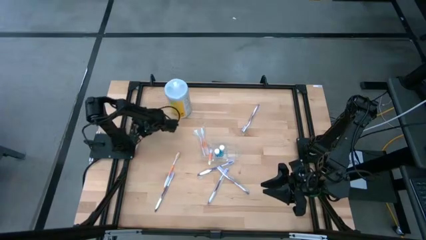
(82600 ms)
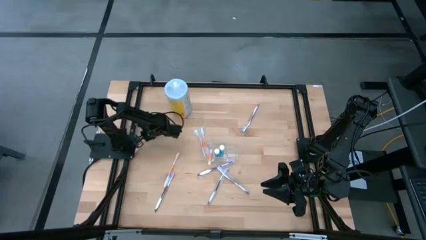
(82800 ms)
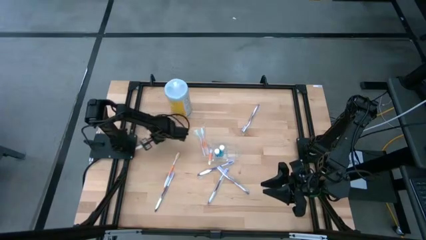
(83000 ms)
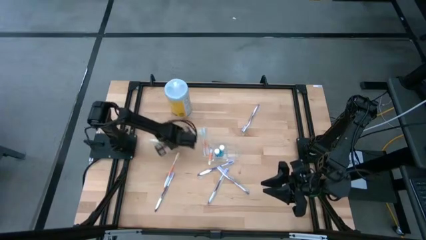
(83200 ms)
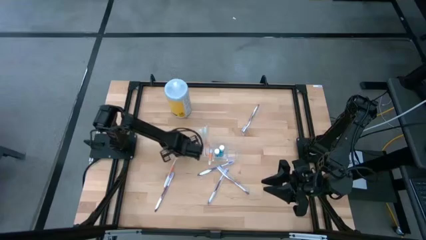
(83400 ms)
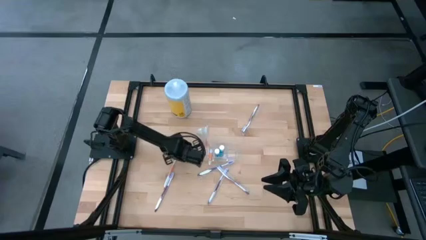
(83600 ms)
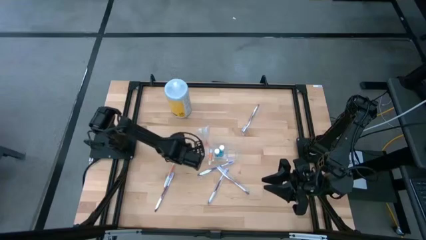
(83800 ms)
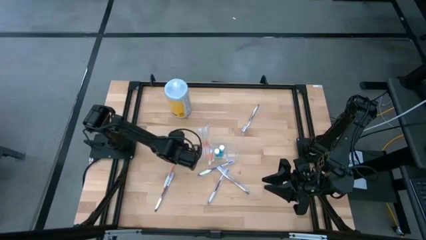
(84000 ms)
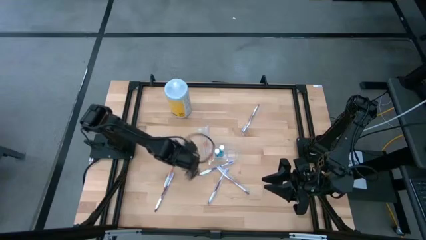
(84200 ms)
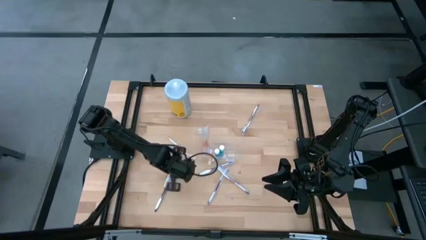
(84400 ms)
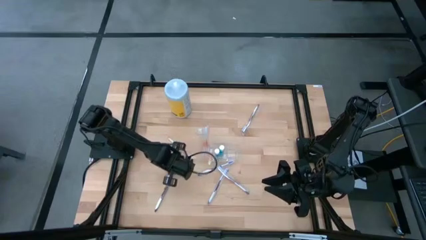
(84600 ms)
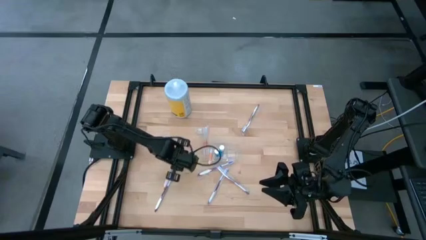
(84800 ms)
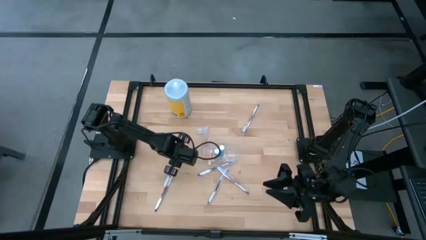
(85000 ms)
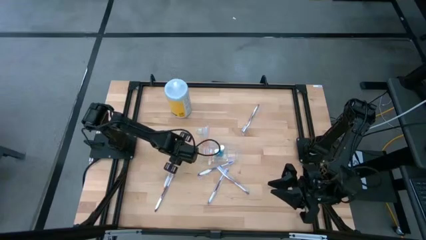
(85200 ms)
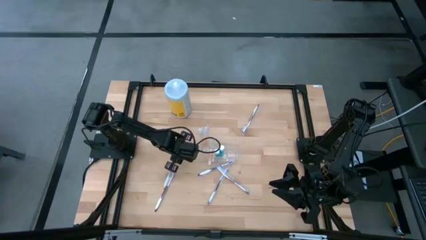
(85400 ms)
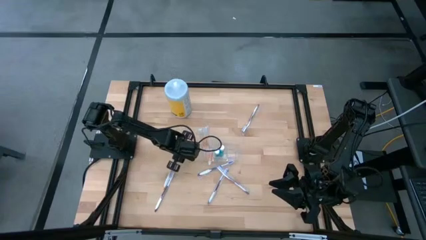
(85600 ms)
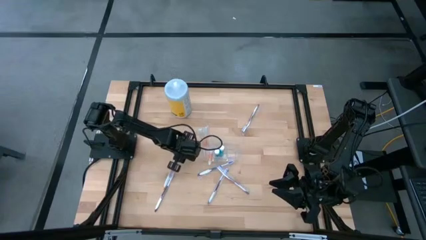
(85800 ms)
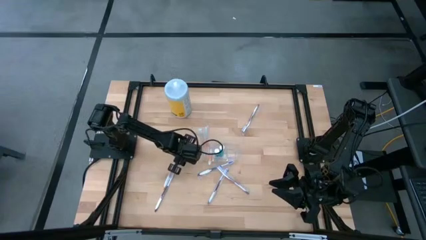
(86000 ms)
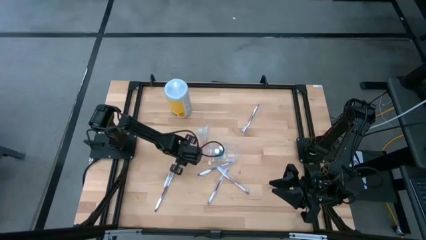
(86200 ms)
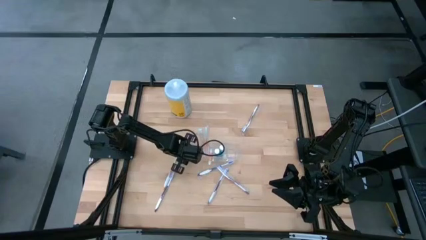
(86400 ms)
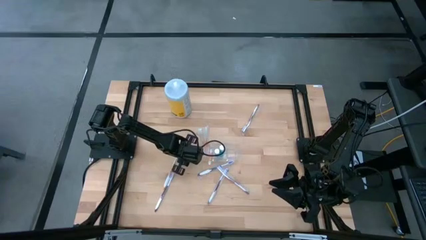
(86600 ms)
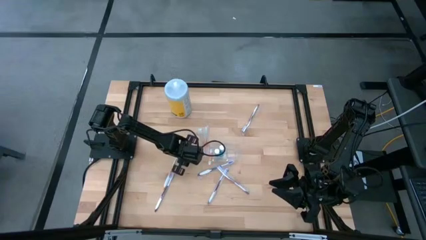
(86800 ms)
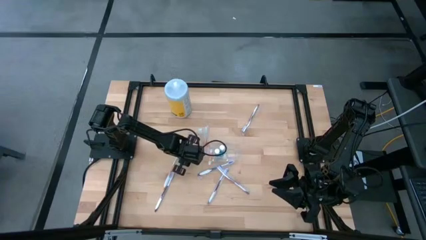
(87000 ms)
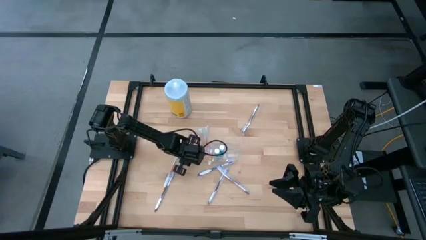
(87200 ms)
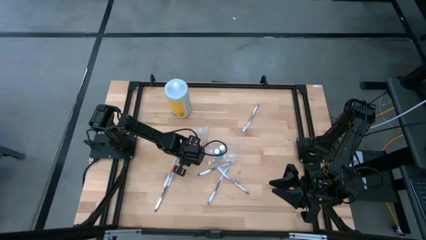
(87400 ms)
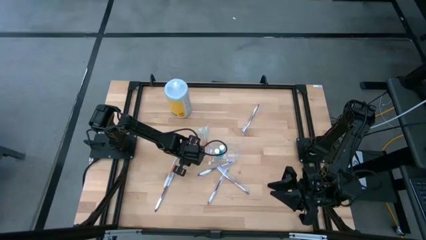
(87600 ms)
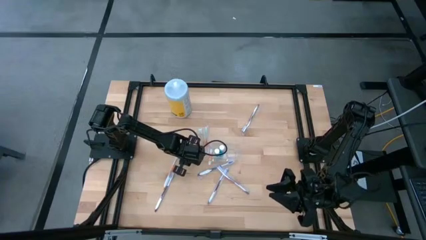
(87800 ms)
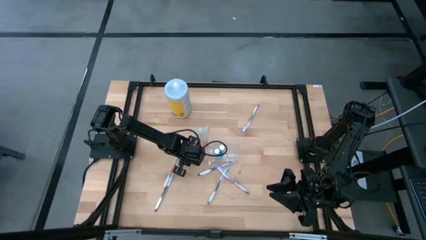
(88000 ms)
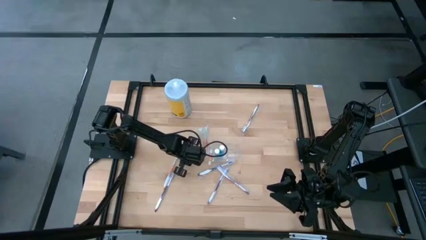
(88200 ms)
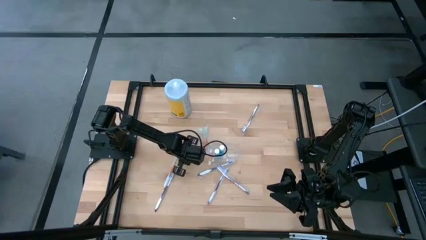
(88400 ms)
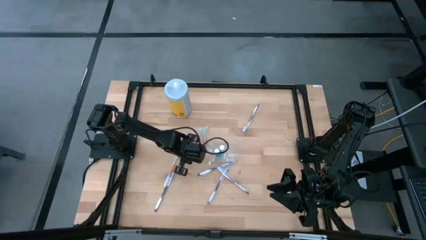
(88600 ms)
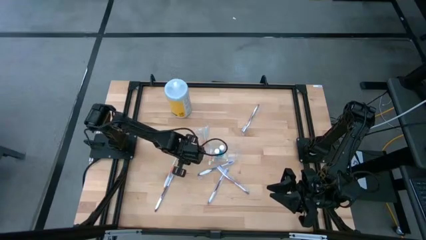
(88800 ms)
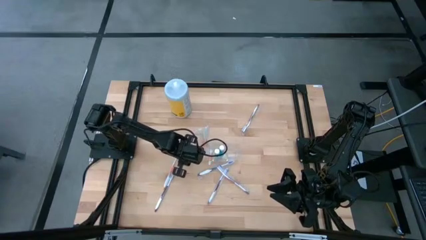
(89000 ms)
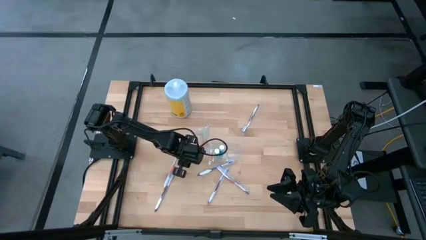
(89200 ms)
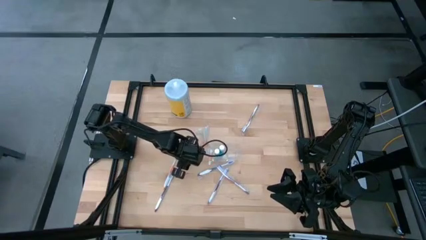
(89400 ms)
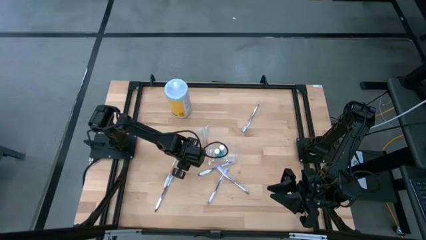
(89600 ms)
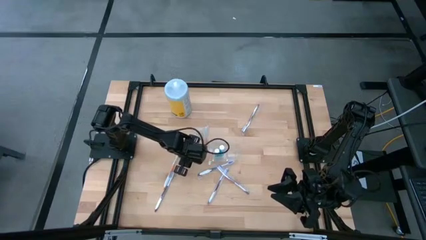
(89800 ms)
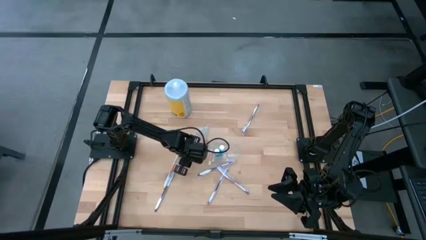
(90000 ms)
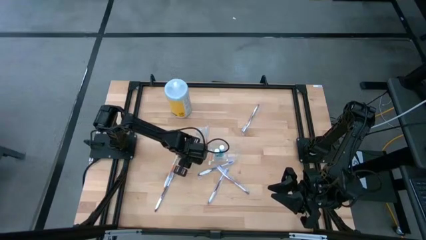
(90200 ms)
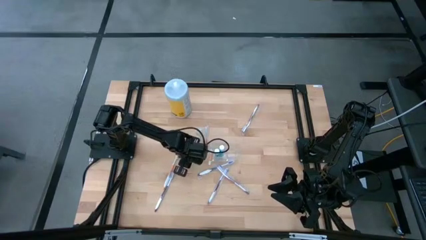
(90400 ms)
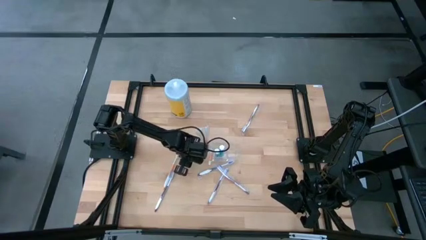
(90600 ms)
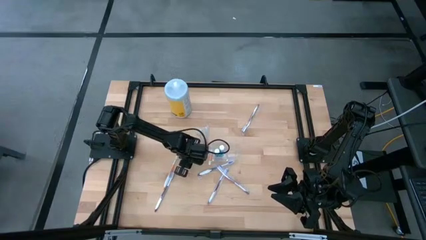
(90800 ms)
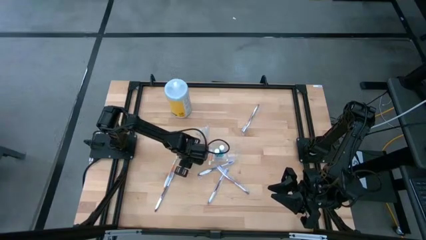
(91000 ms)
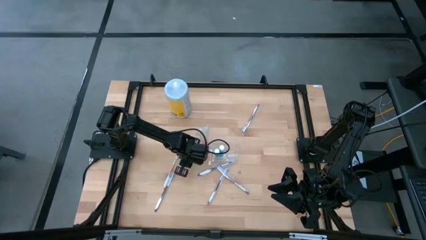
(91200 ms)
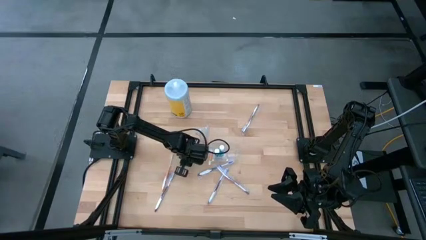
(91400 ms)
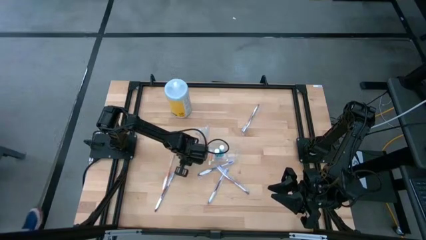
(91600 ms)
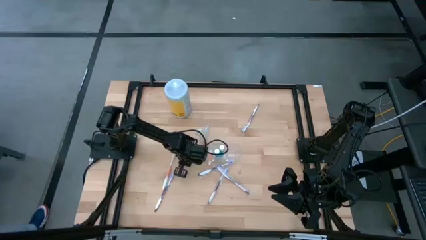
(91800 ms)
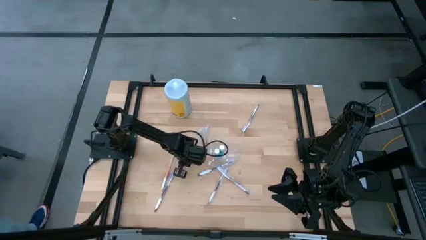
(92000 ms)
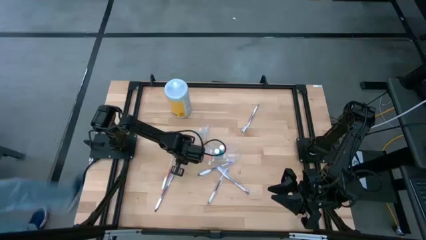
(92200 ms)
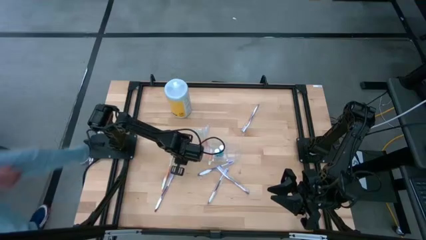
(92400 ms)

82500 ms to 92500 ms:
Task: Pick & Place toothbrushing station
Put the white and orange toothbrush into the left compartment of the transparent organizer

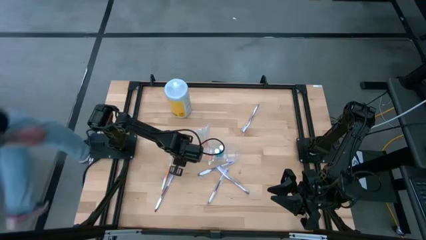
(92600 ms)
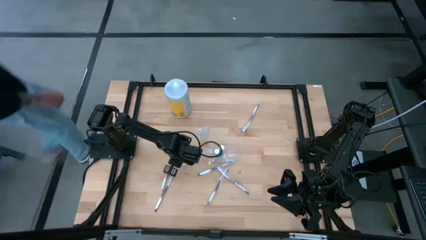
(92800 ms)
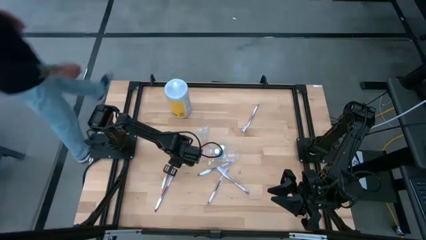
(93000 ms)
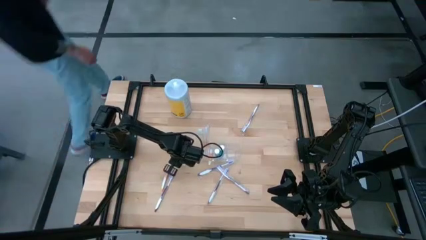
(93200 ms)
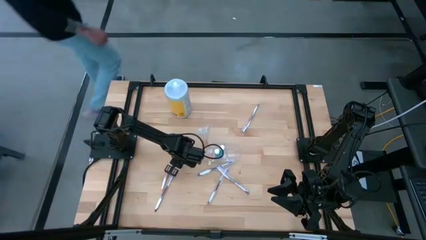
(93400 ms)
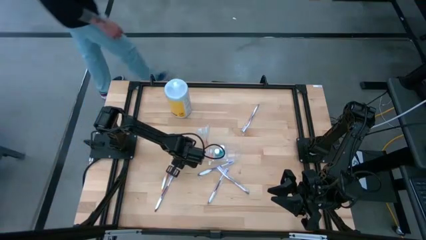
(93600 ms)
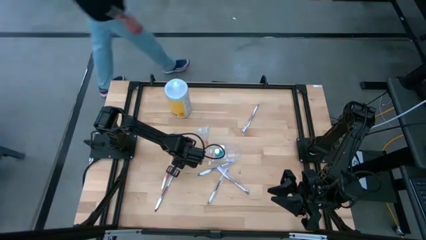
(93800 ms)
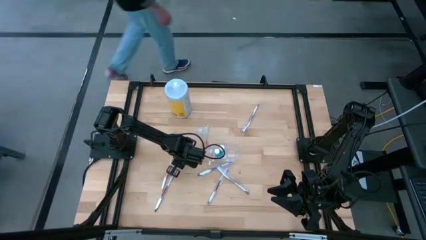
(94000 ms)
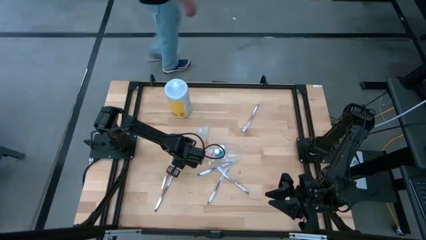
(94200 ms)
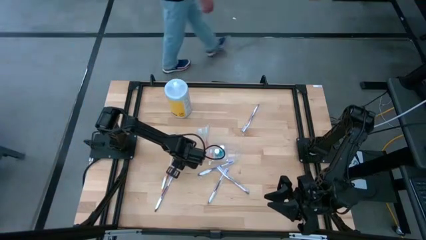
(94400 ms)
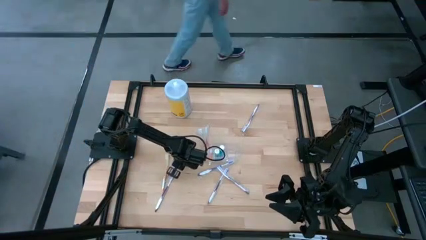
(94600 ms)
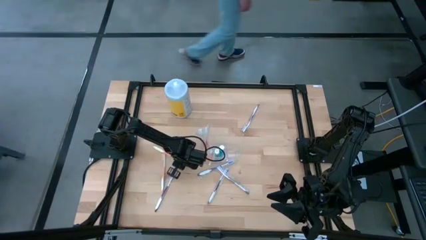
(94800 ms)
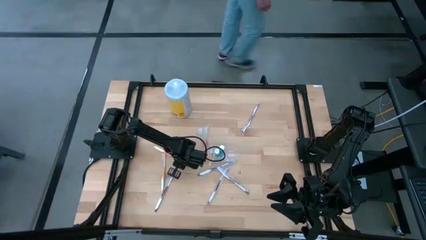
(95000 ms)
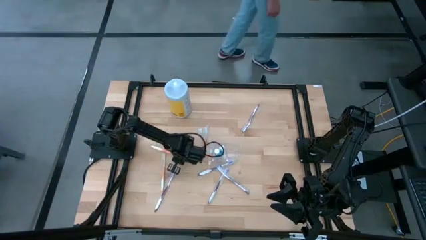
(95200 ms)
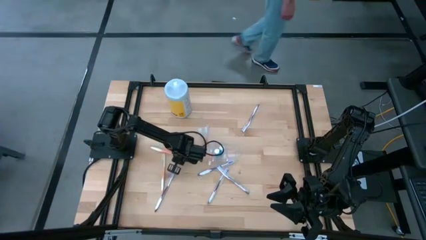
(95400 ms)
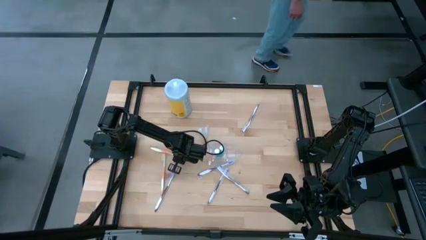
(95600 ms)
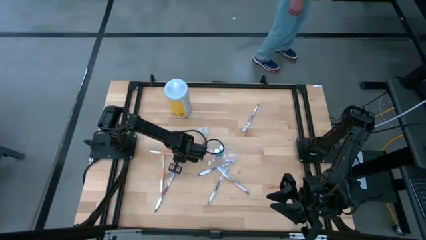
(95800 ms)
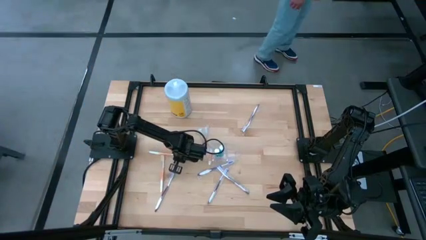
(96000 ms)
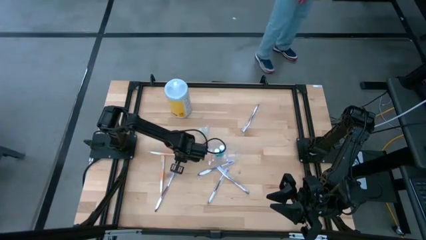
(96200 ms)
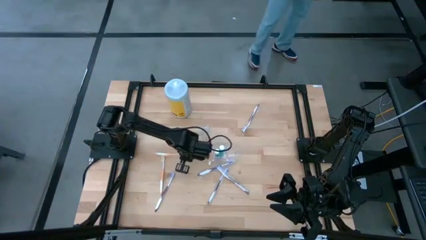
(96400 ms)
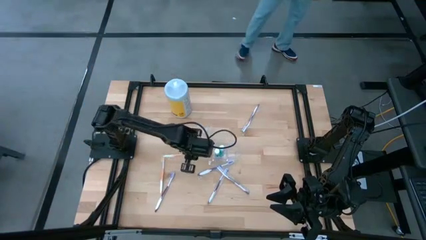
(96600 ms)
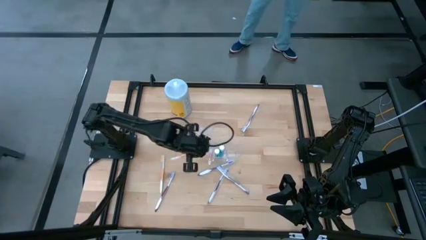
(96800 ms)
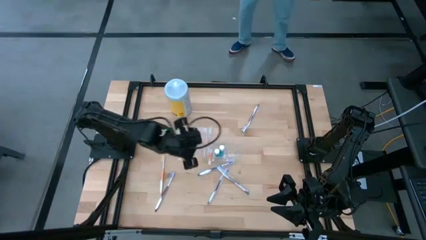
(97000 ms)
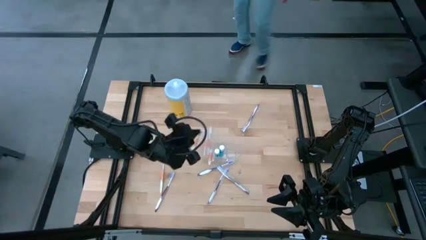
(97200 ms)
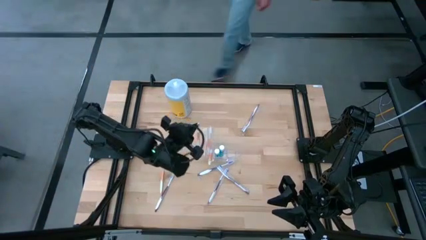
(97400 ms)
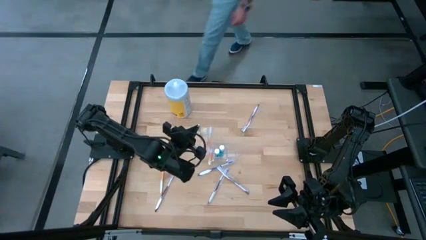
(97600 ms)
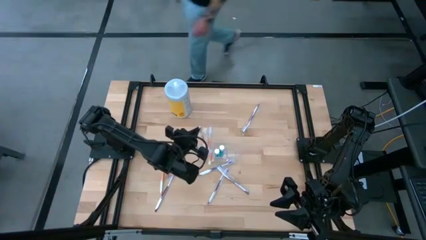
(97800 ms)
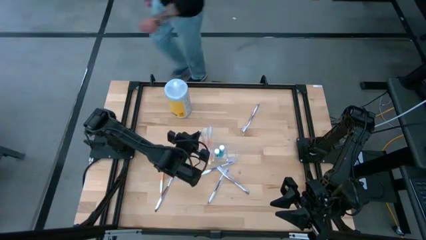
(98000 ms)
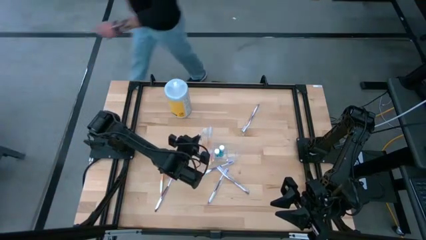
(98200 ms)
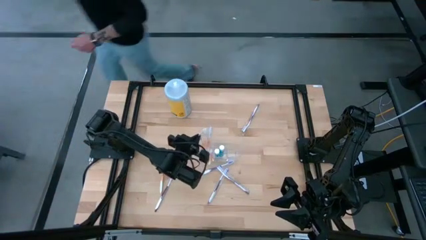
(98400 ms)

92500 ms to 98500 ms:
Put the white and orange toothbrush into the left compartment of the transparent organizer
